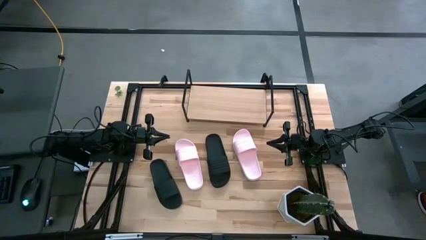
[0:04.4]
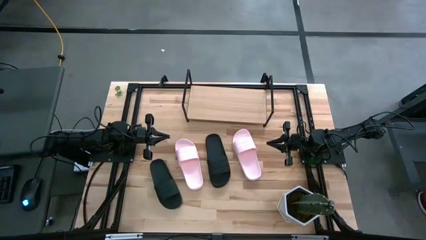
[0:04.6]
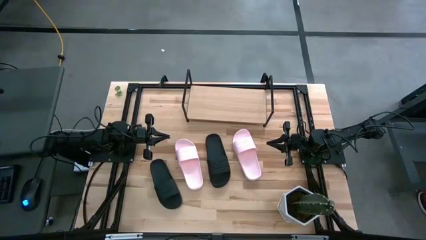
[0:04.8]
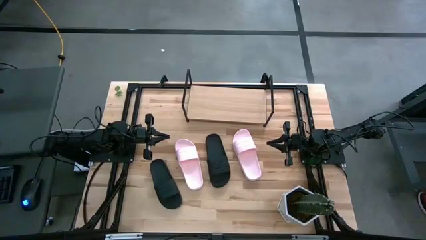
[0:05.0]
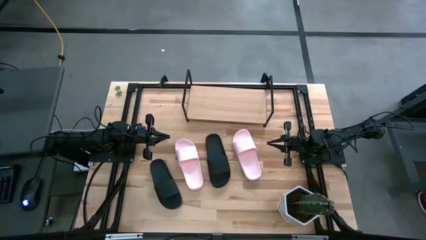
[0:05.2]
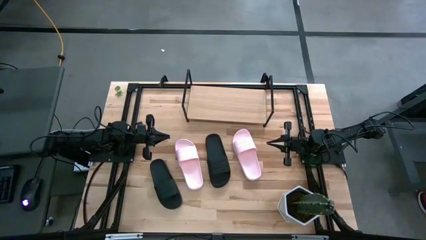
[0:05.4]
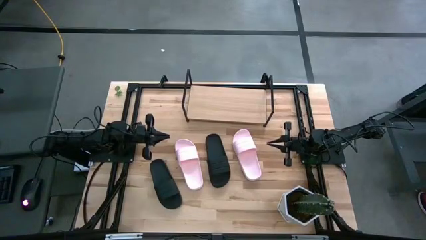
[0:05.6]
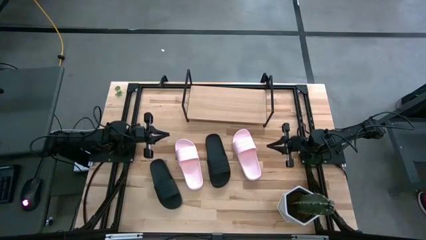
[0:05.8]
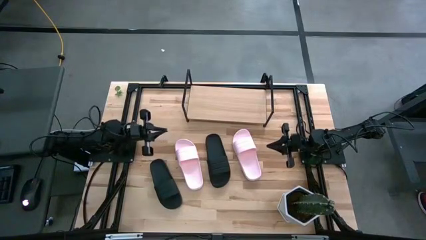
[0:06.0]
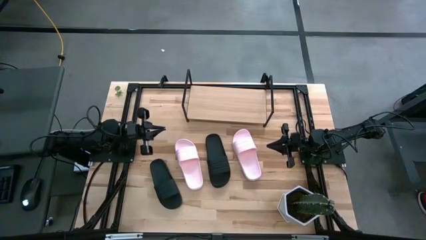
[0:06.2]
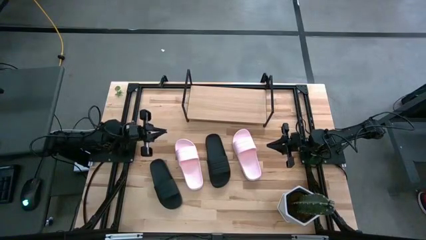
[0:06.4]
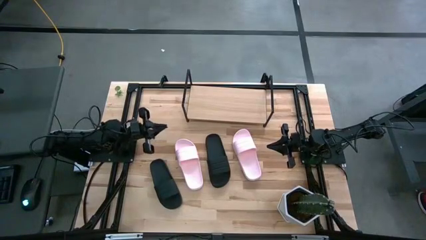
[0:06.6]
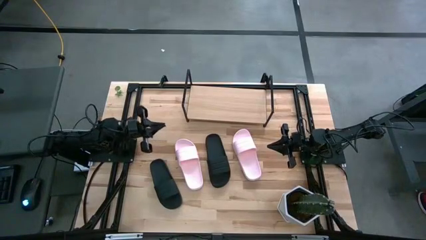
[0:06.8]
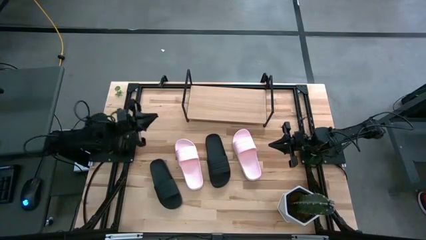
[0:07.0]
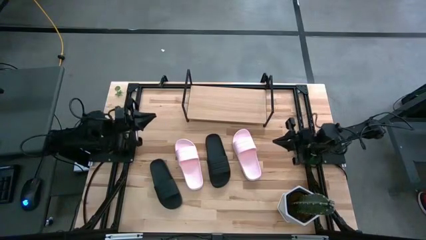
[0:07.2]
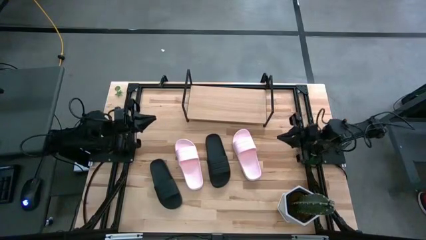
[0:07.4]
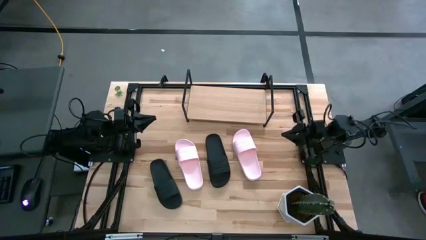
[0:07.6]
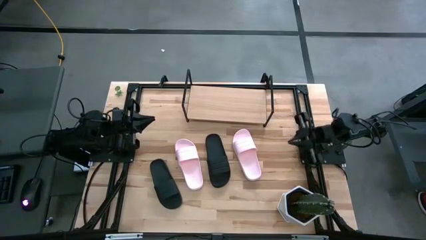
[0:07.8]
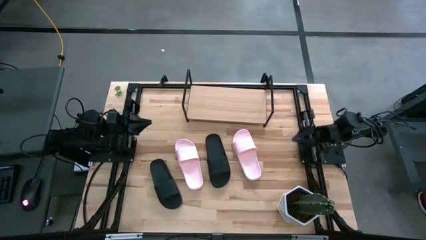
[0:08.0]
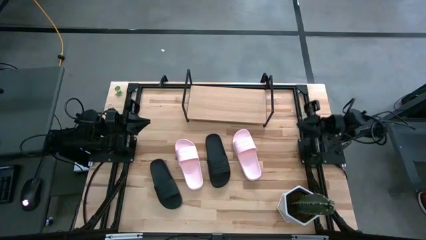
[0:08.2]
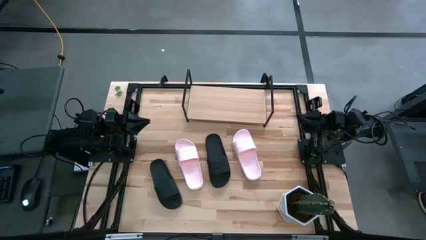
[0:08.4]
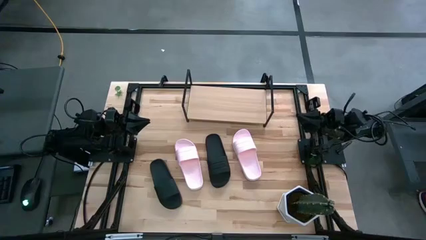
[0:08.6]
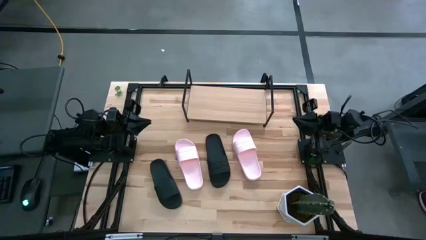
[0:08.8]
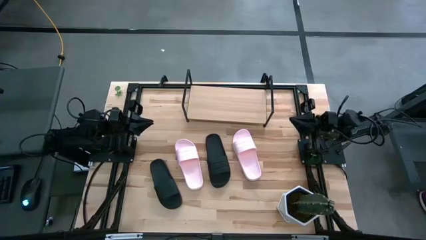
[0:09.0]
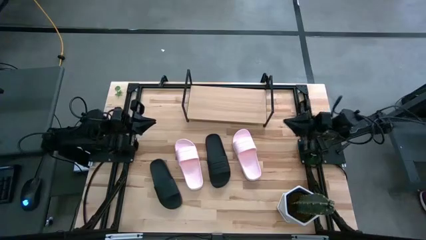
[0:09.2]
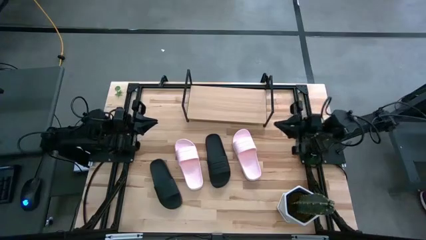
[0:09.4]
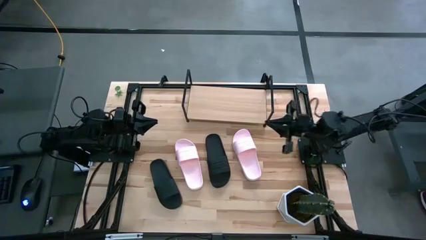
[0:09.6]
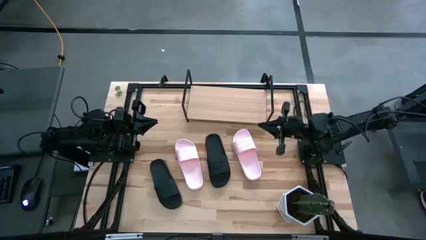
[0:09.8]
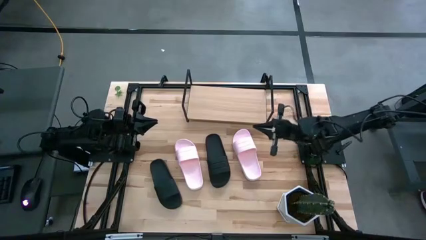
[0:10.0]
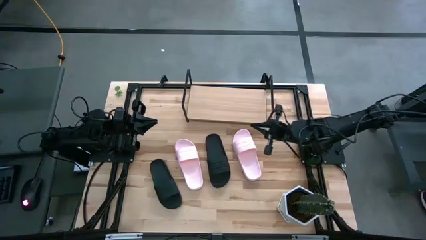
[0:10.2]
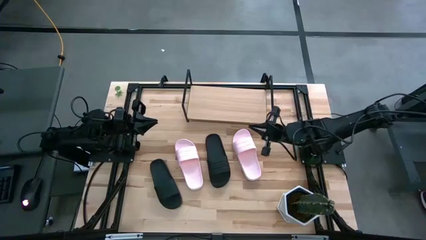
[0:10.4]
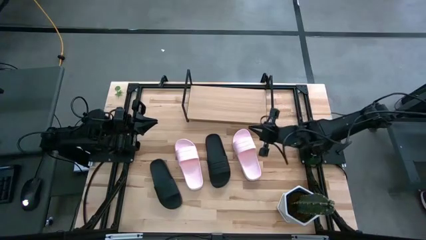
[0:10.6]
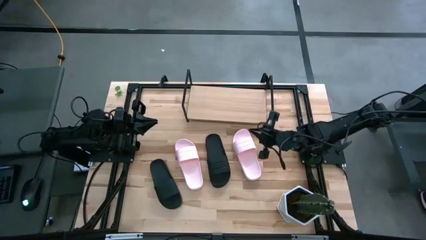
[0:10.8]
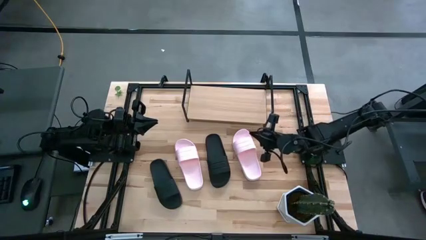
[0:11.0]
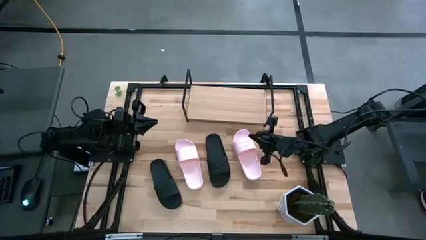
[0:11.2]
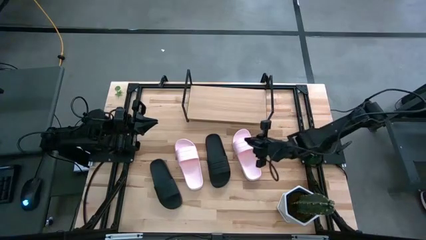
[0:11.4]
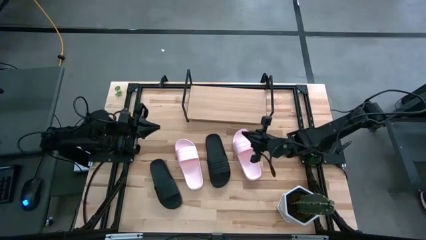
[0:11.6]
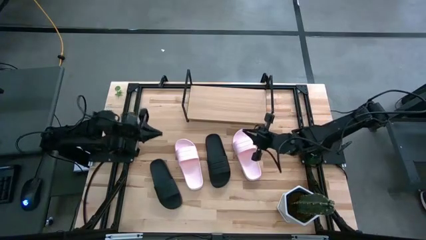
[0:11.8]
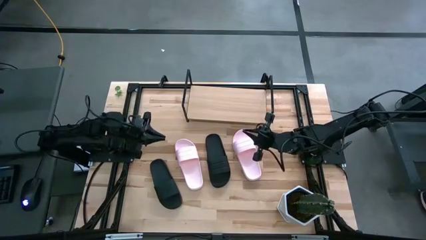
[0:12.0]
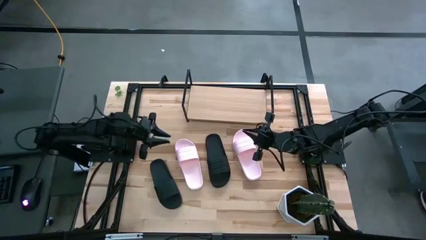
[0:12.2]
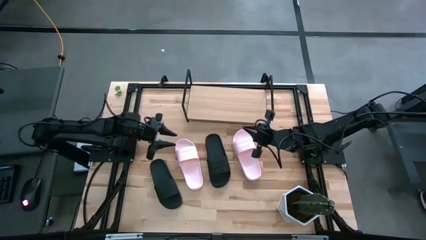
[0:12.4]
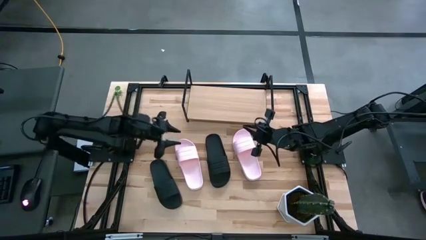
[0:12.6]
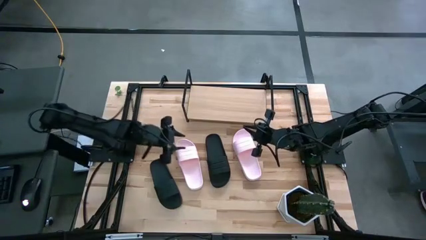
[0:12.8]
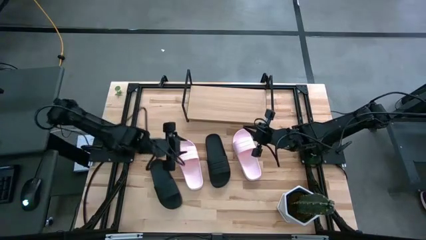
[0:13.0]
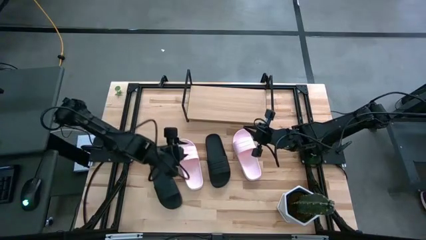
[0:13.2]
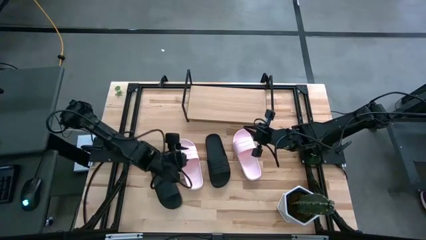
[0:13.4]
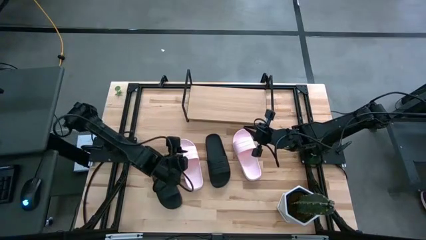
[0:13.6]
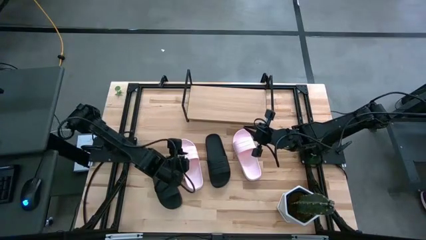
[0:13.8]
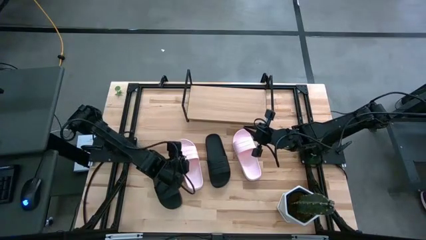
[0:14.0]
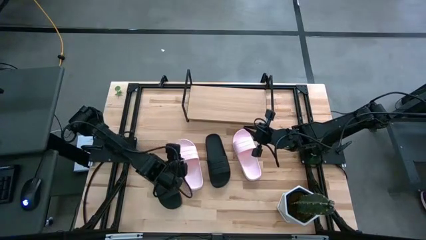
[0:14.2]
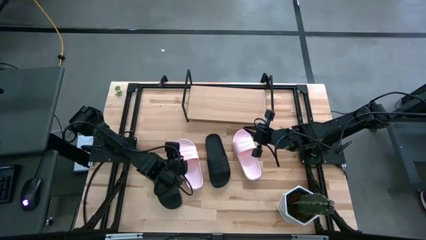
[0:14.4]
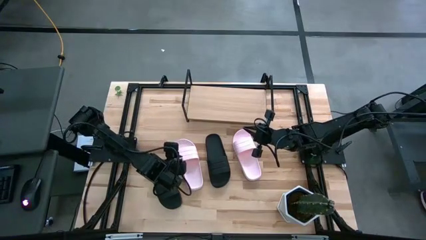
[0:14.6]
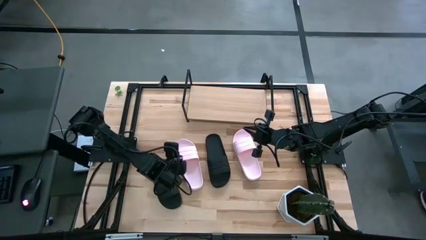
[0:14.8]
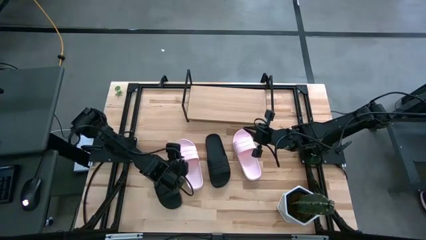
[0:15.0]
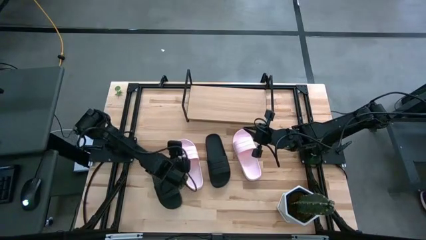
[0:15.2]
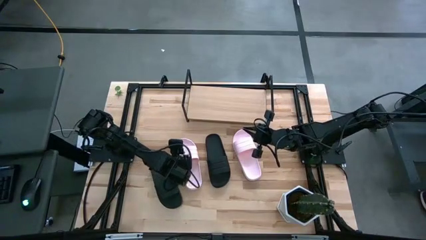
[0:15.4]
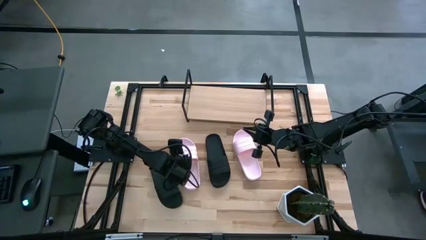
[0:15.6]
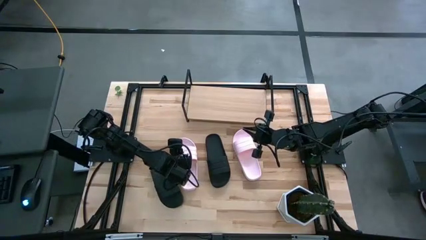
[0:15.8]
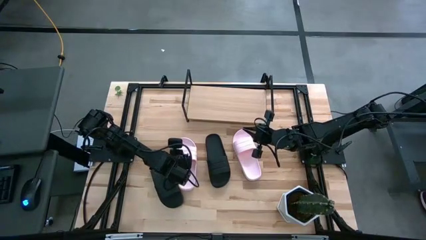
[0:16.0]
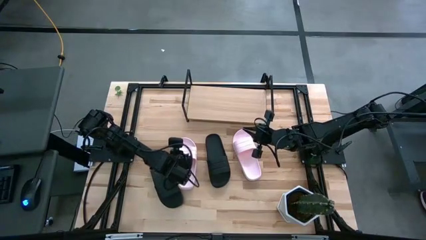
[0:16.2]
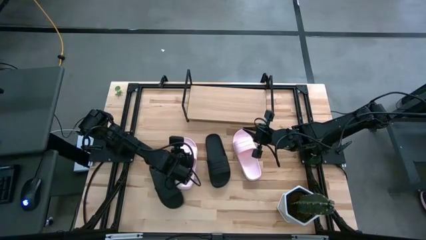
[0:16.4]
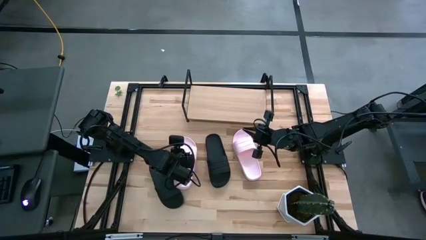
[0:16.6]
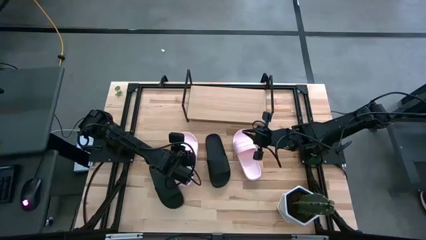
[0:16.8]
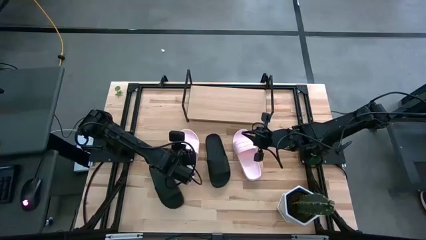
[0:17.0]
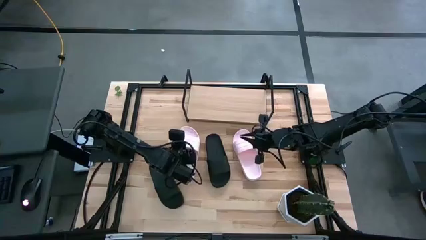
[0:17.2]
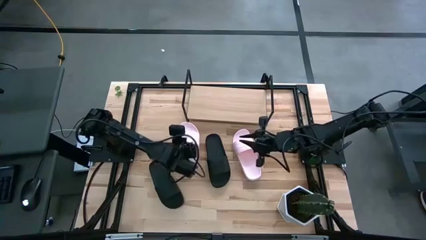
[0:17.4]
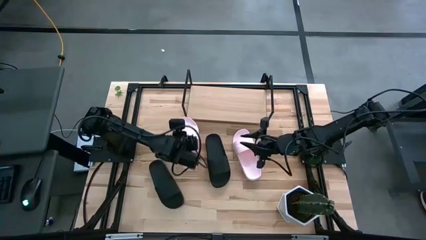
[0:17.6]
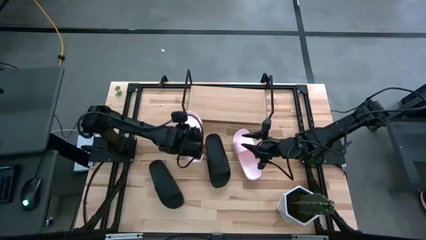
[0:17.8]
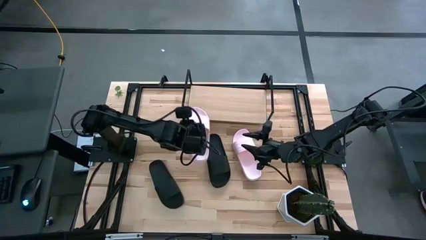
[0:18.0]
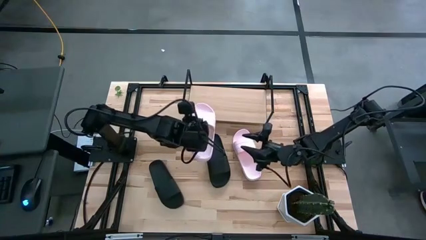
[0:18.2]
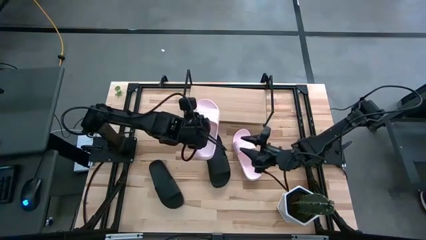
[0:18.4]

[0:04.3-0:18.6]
Task: Pick and place slides into the shelf
Put the left pink slide on the shelf
